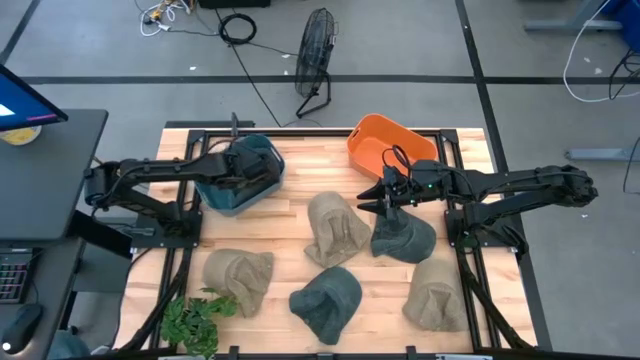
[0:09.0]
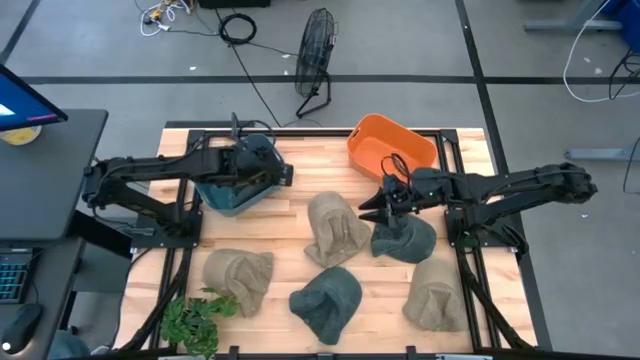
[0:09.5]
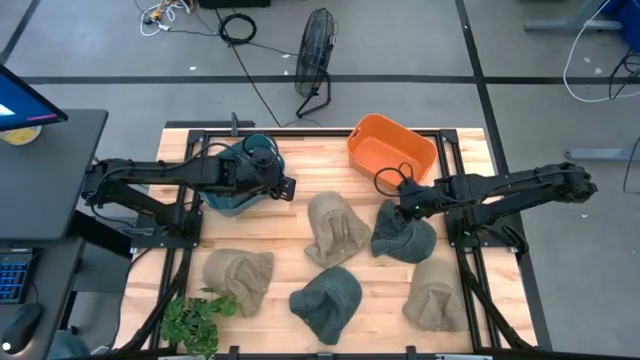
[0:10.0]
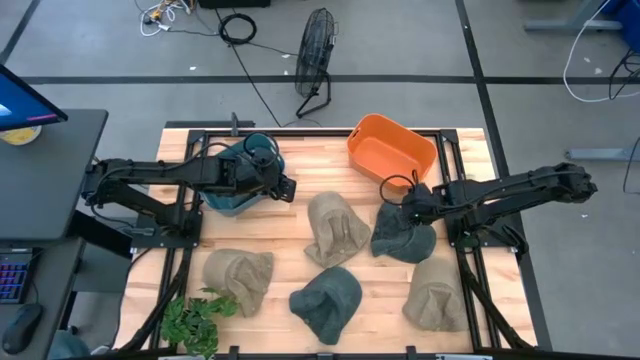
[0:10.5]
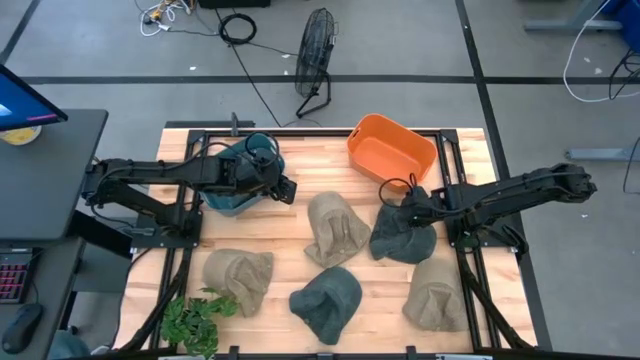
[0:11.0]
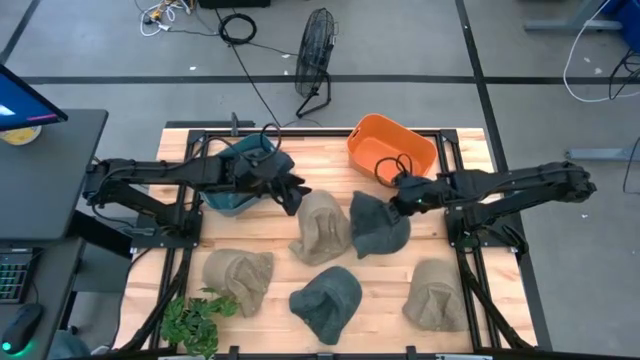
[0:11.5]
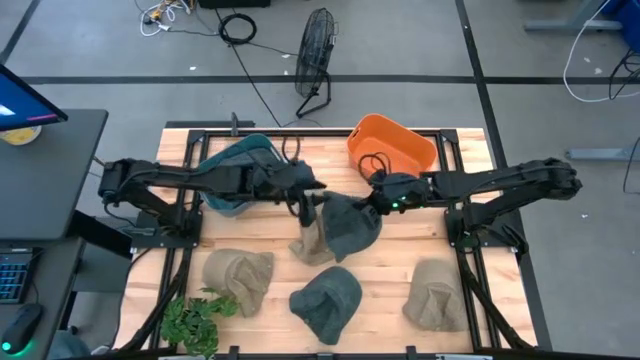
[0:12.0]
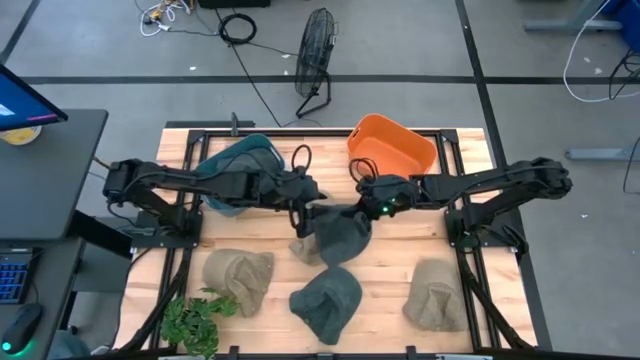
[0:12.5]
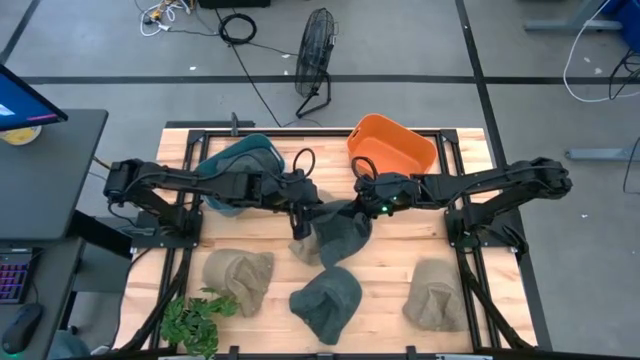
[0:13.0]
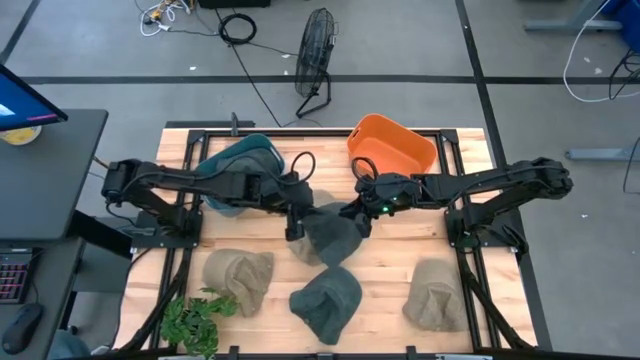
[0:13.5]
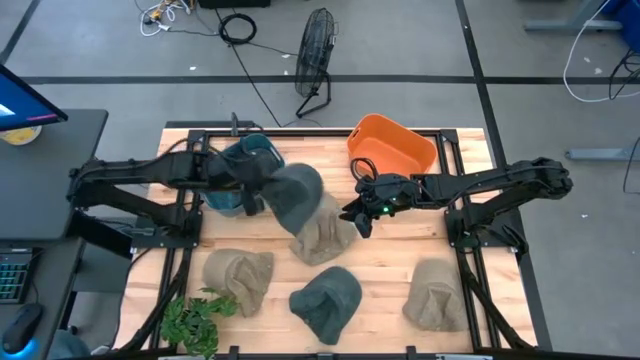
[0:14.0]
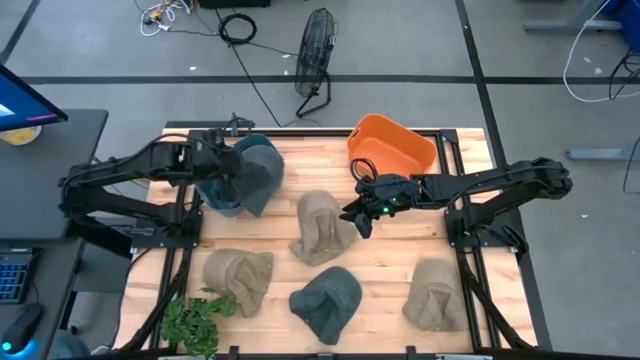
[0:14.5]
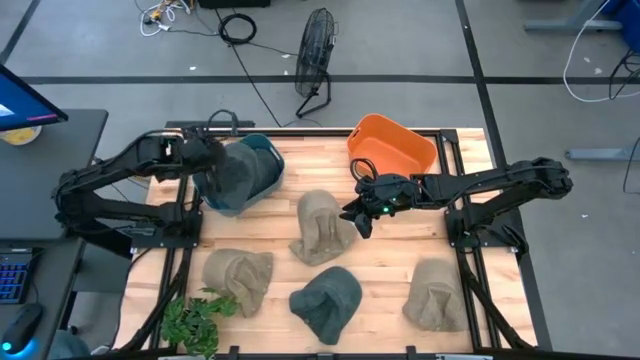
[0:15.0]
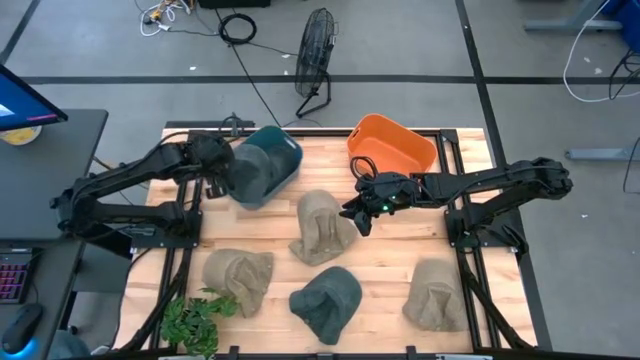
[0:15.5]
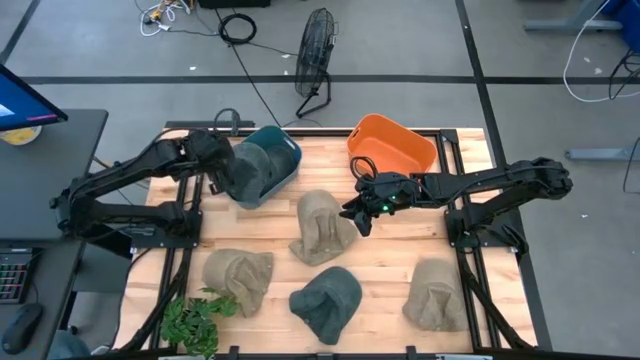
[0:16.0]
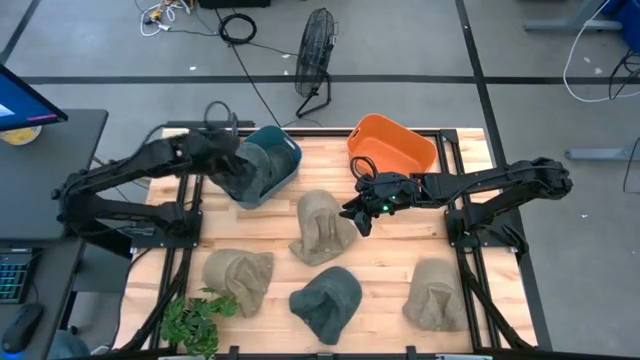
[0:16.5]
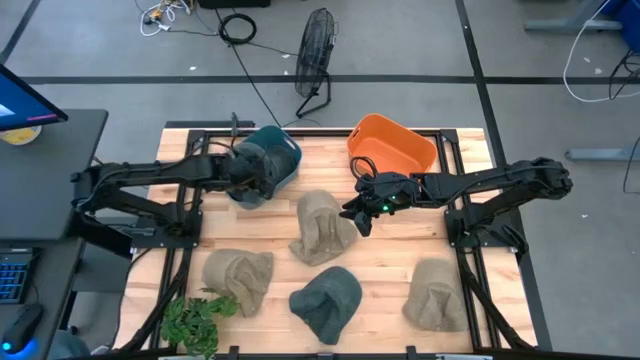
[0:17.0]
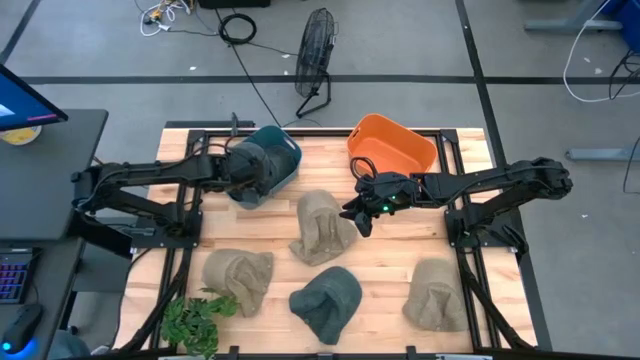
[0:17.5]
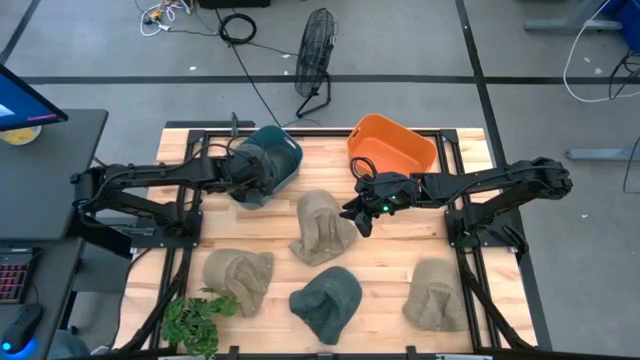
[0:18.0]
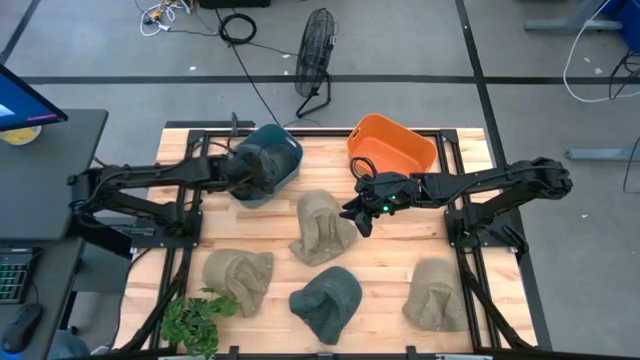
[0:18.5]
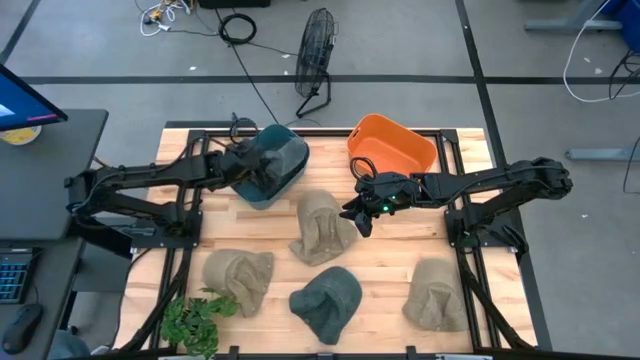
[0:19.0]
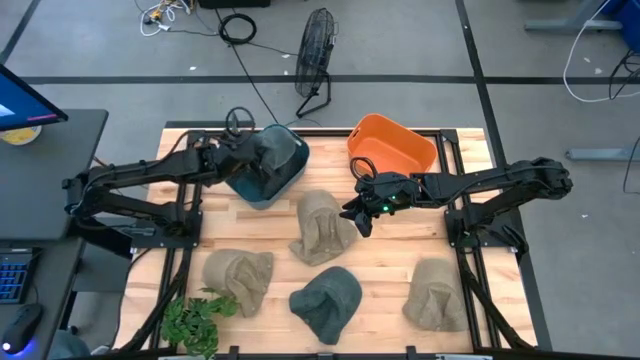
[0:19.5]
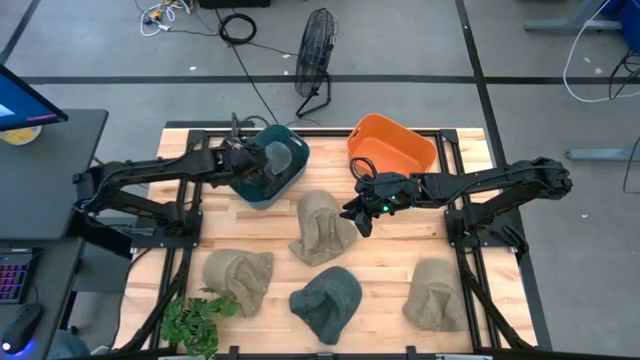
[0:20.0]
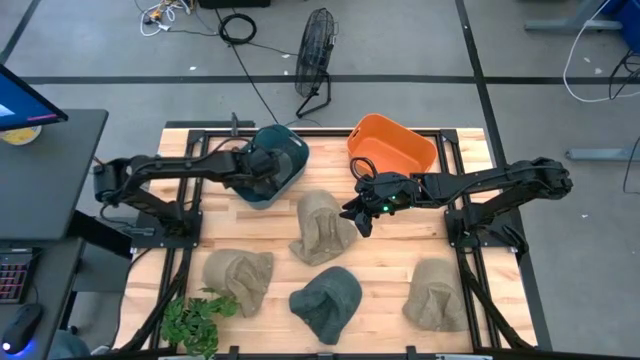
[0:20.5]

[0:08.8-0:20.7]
Task: Pick & Place hat
Put the top black cap into the blue bin

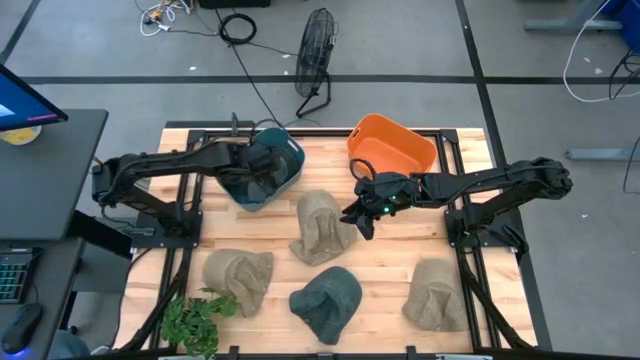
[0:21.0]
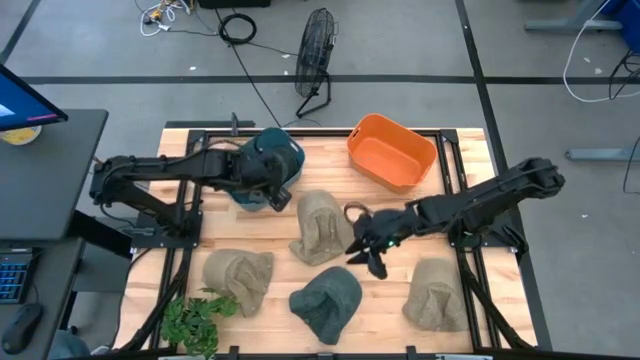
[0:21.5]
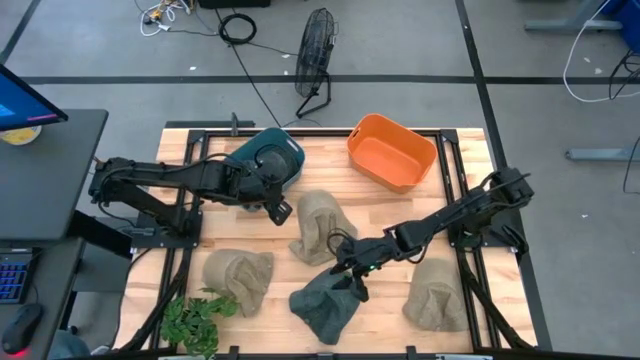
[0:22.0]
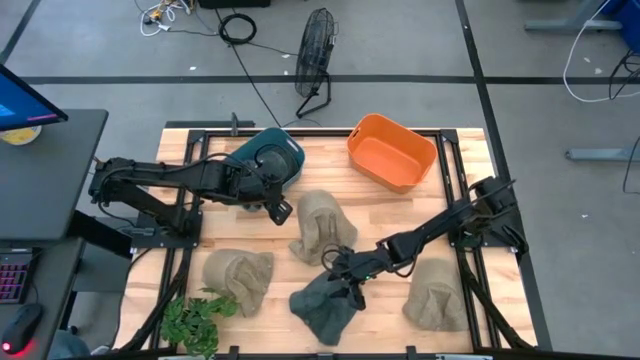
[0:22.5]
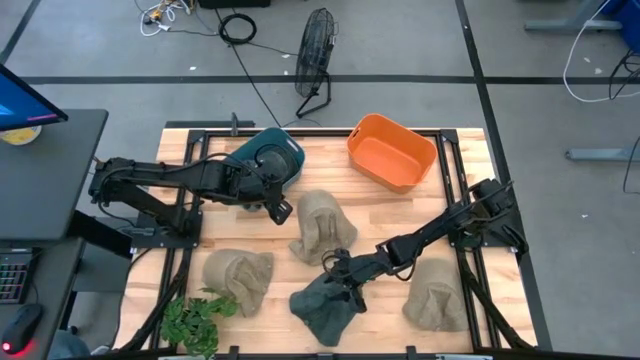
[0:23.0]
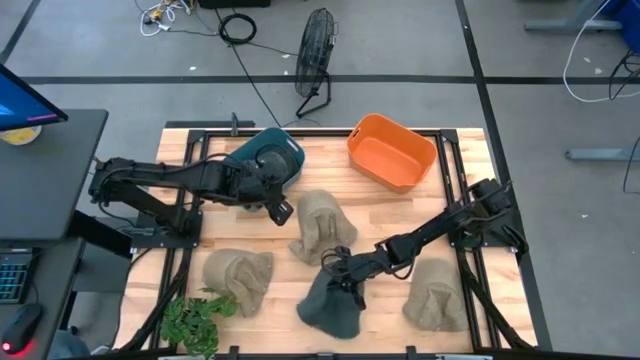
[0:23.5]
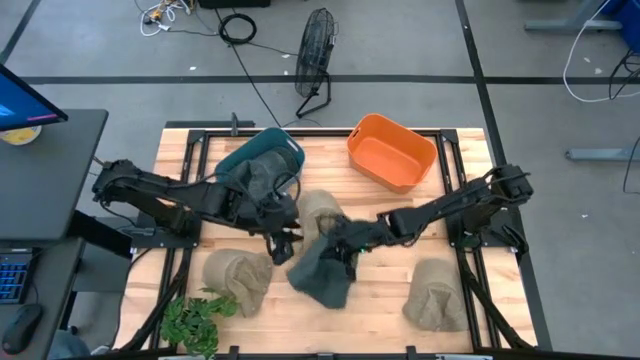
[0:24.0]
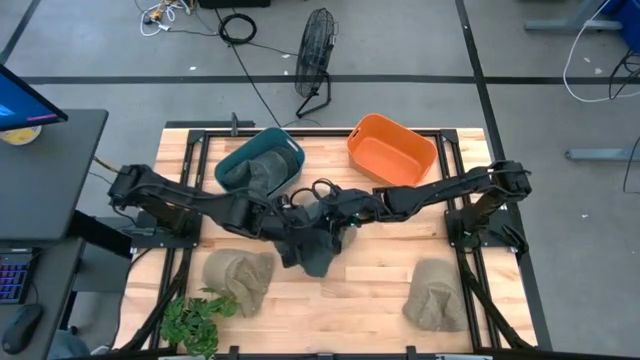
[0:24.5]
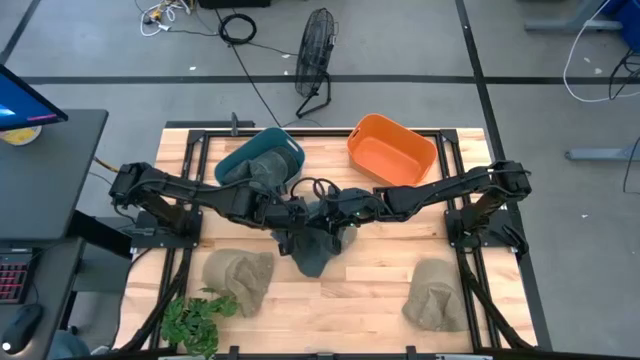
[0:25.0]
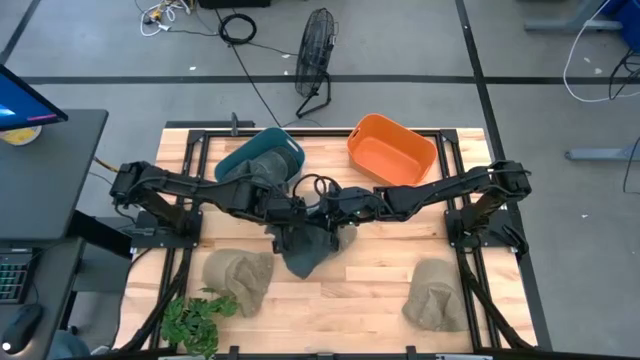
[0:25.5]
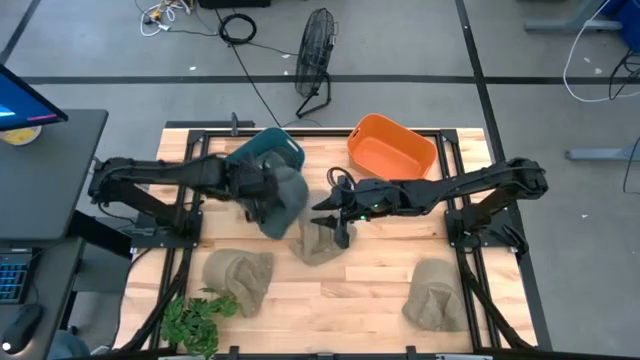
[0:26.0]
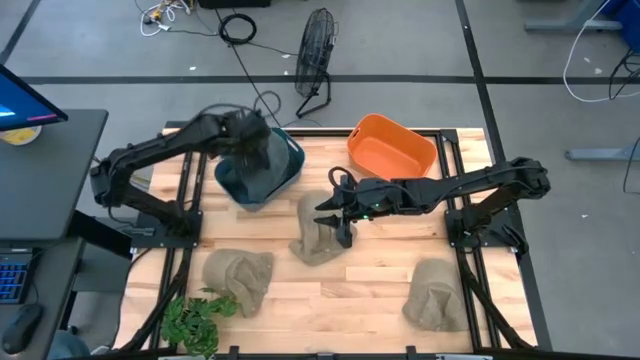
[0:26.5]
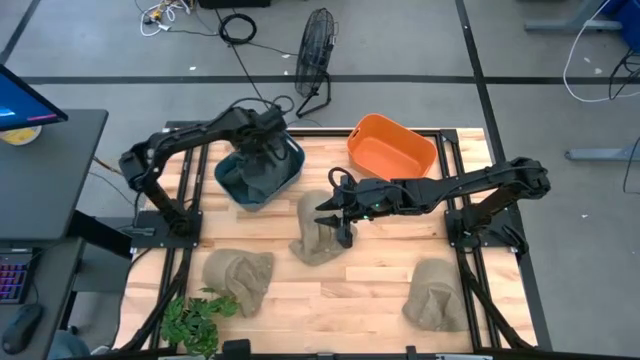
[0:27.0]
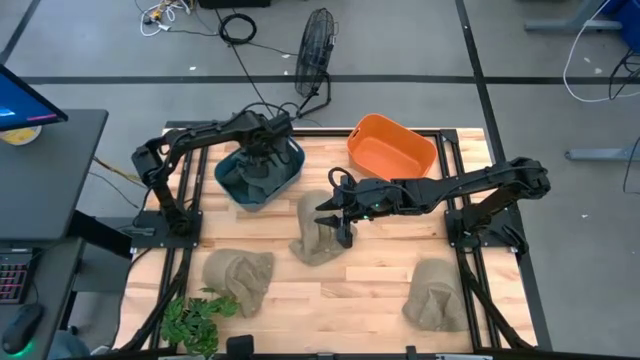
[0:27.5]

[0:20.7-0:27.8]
Put the black cap into the blue bin

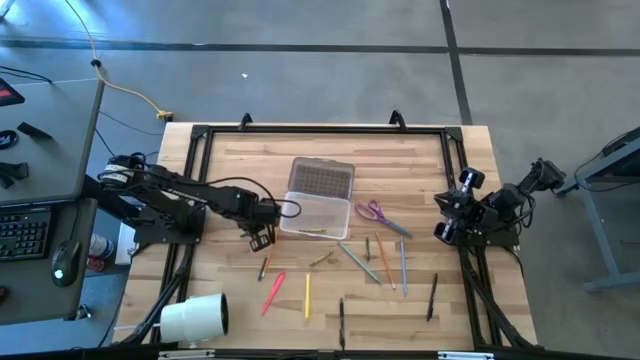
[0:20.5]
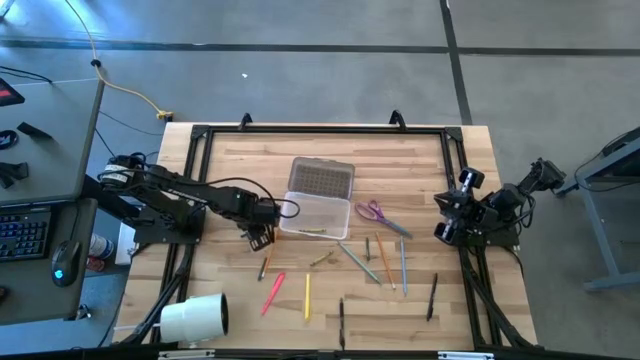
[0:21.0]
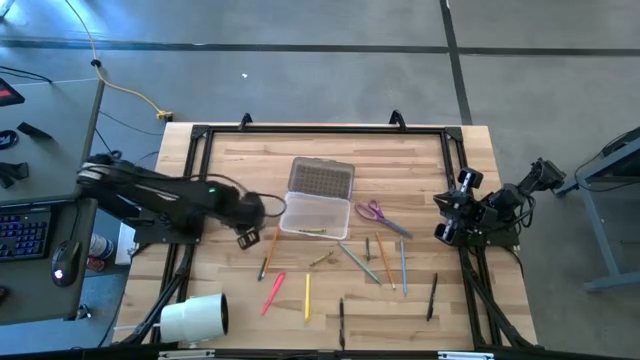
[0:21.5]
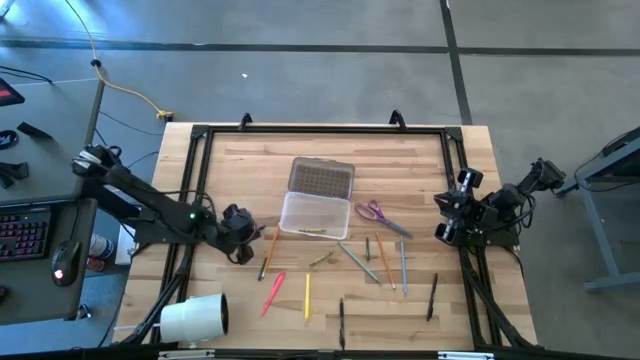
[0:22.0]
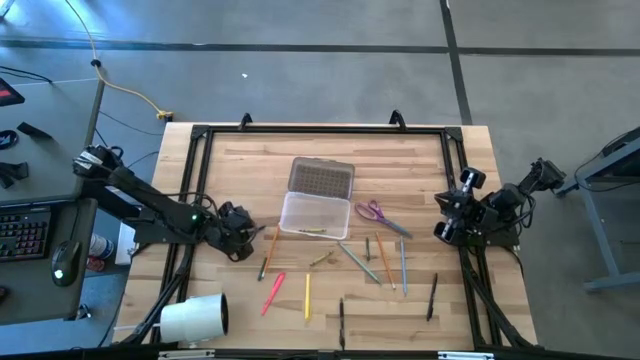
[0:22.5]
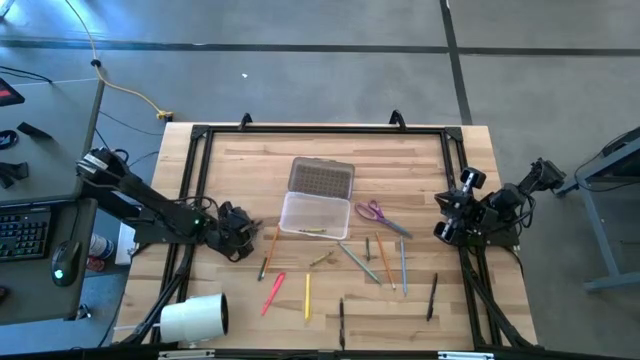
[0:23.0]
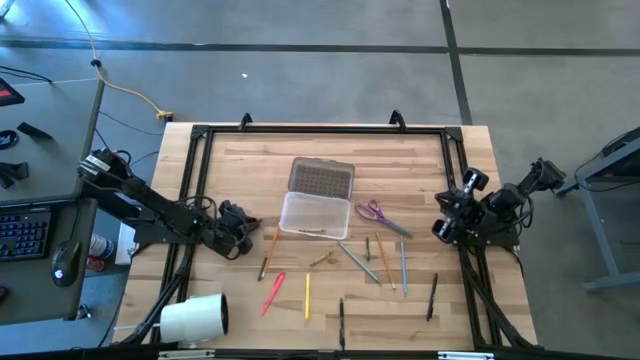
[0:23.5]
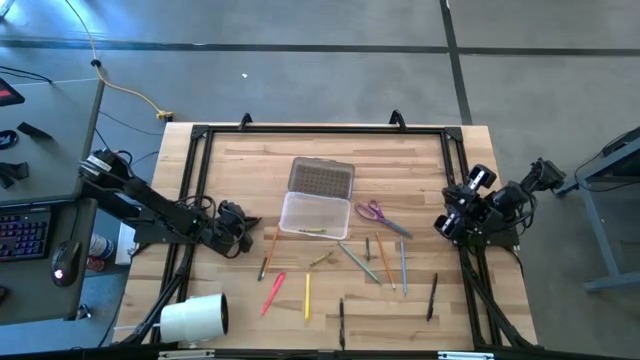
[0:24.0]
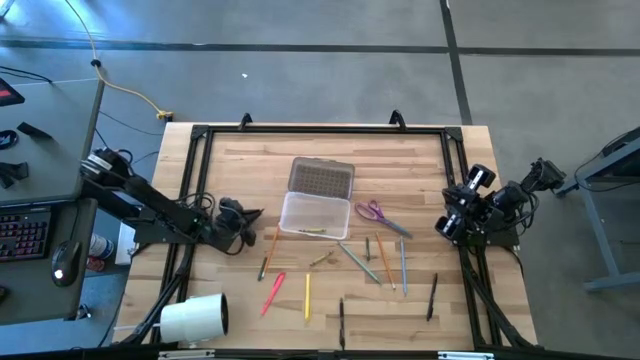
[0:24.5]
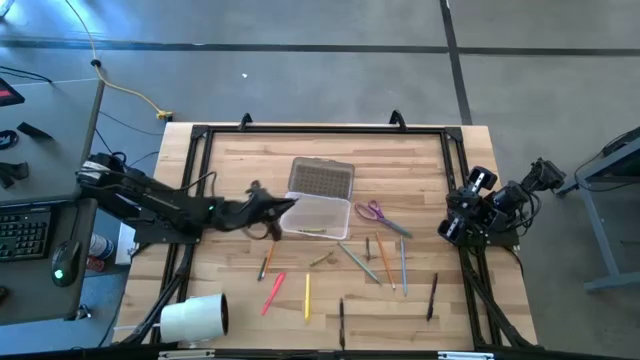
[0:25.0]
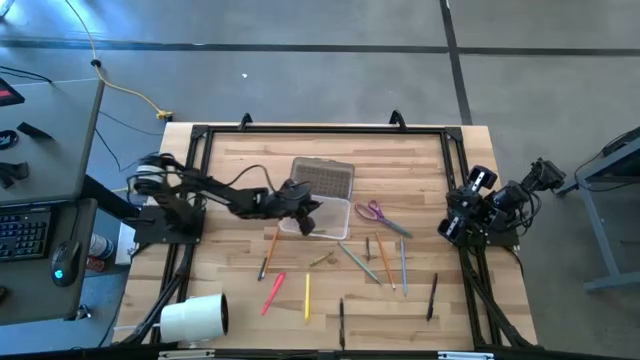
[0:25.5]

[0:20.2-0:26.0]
Task: Pick & place school supplies into a supply box
Put the green crayon into the black supply box
